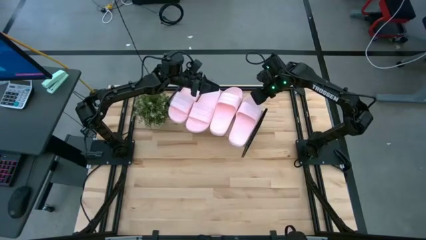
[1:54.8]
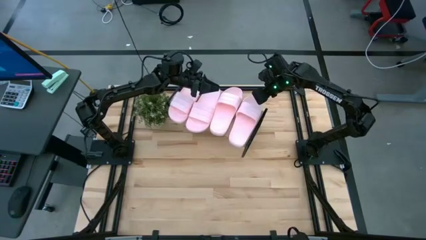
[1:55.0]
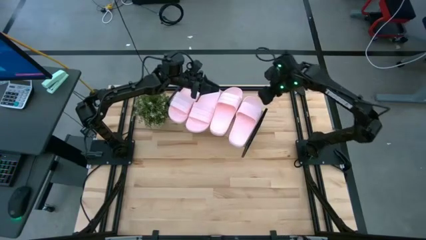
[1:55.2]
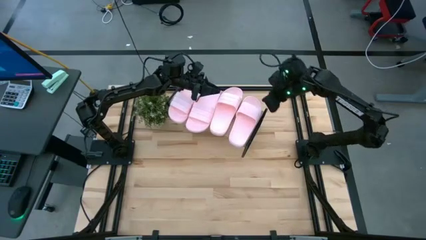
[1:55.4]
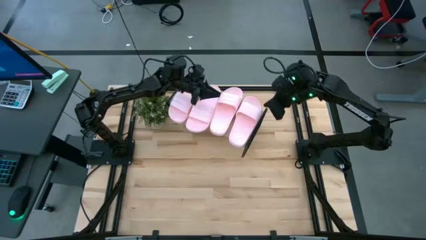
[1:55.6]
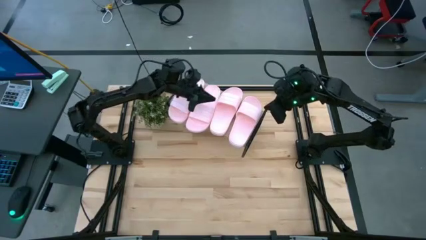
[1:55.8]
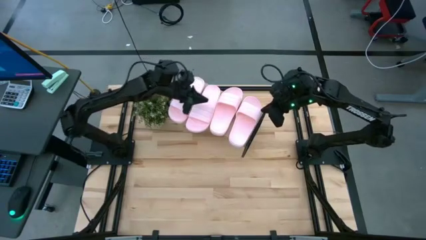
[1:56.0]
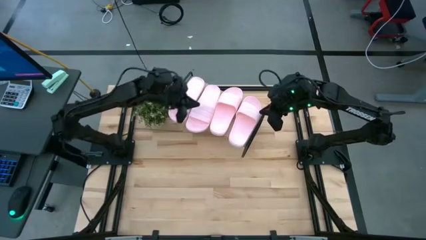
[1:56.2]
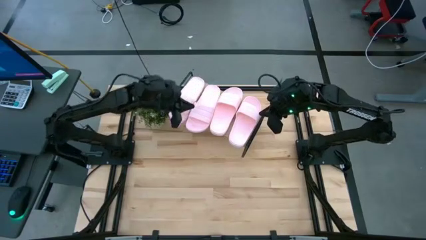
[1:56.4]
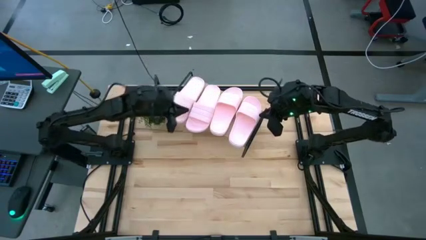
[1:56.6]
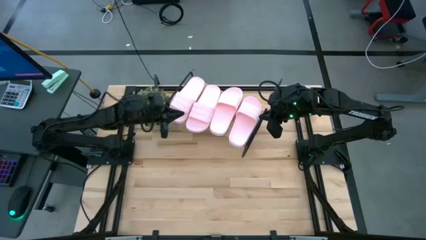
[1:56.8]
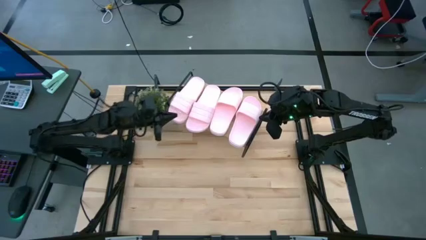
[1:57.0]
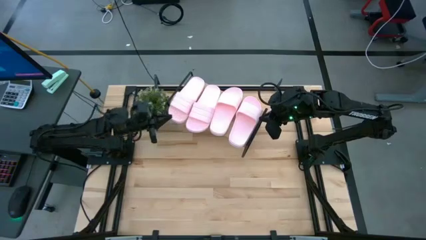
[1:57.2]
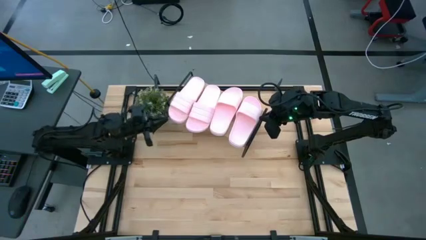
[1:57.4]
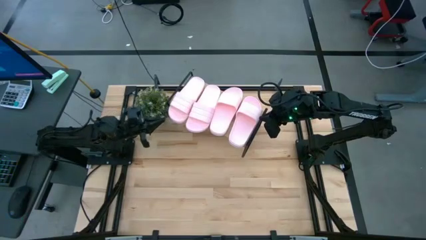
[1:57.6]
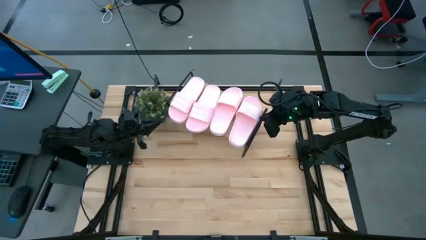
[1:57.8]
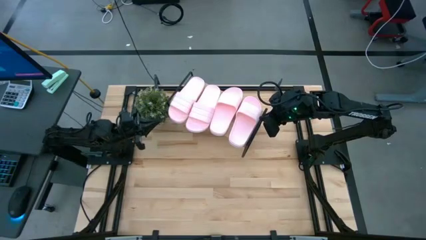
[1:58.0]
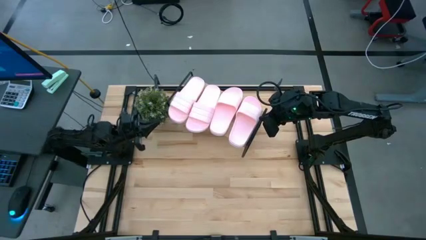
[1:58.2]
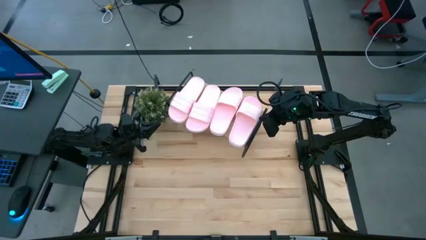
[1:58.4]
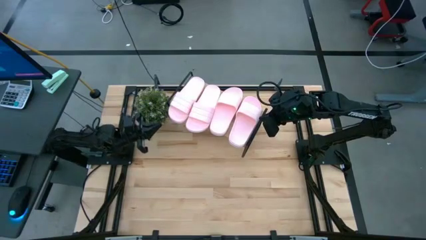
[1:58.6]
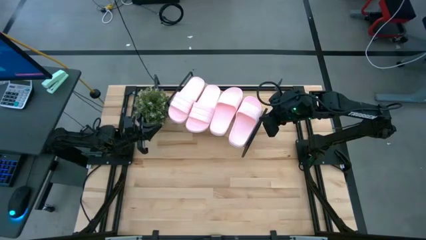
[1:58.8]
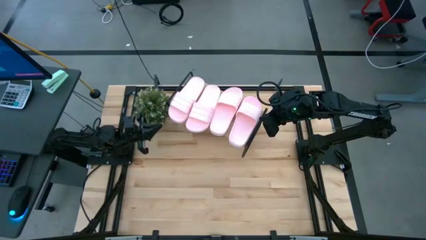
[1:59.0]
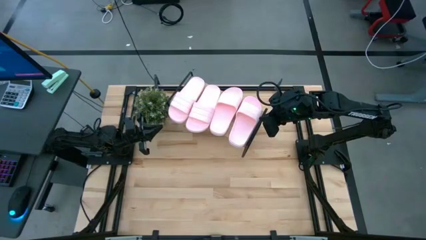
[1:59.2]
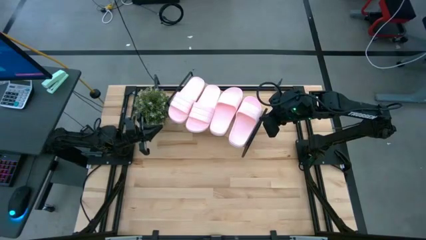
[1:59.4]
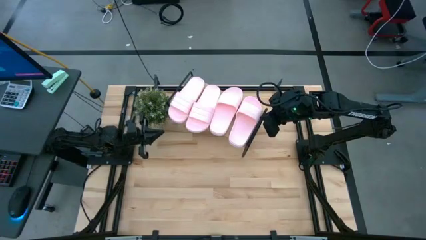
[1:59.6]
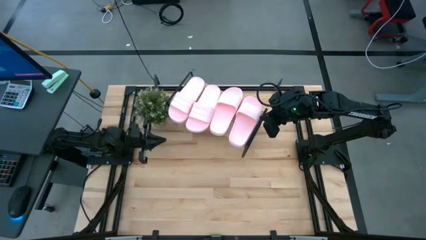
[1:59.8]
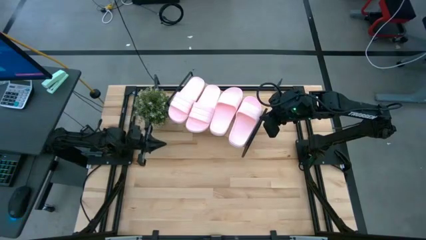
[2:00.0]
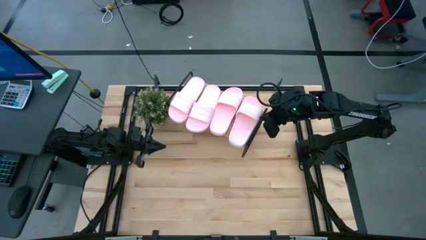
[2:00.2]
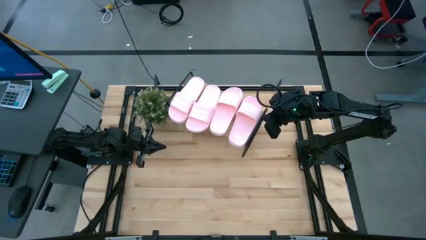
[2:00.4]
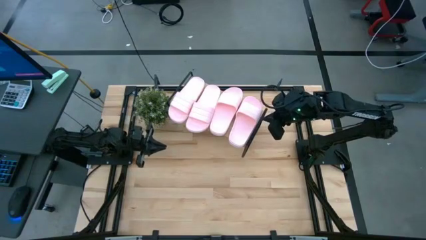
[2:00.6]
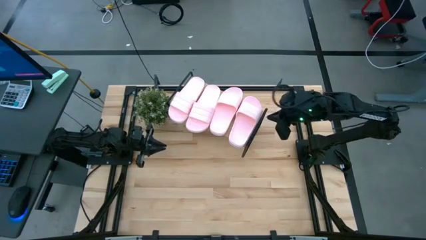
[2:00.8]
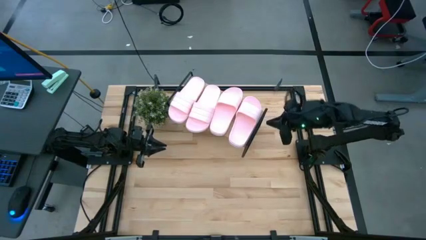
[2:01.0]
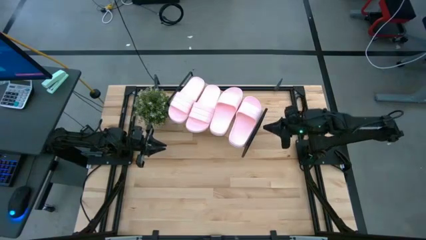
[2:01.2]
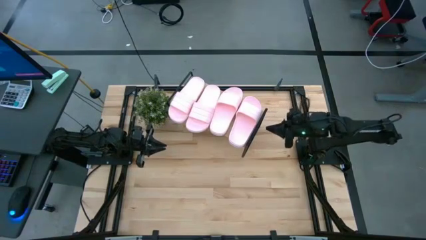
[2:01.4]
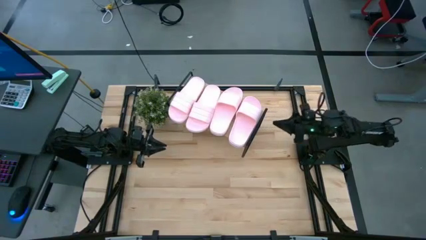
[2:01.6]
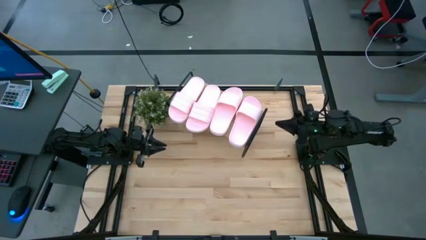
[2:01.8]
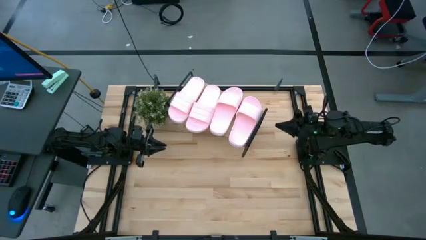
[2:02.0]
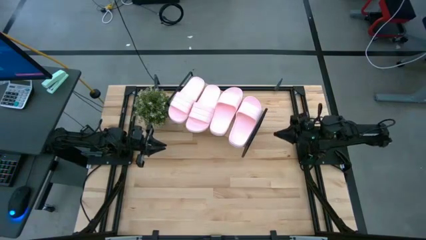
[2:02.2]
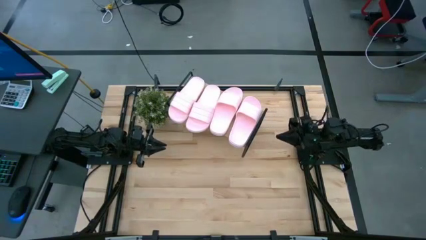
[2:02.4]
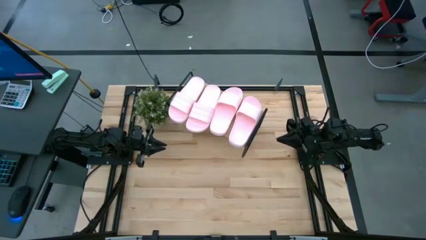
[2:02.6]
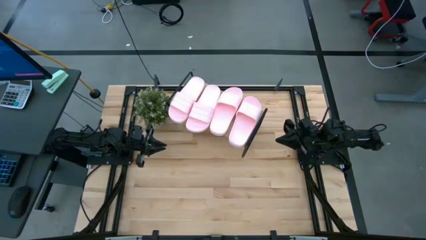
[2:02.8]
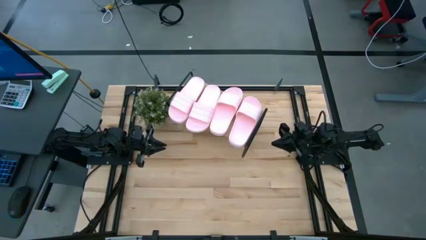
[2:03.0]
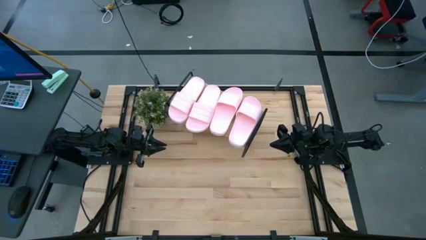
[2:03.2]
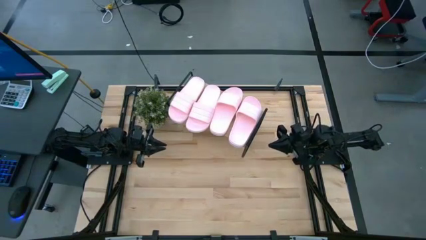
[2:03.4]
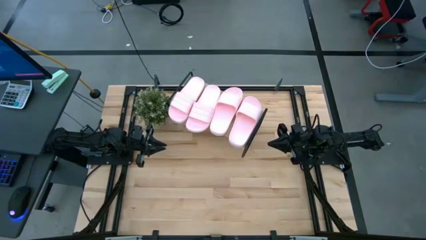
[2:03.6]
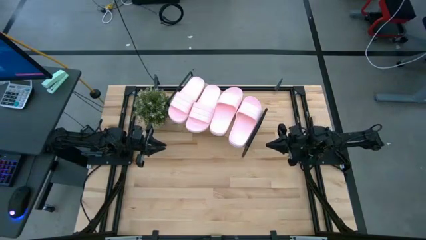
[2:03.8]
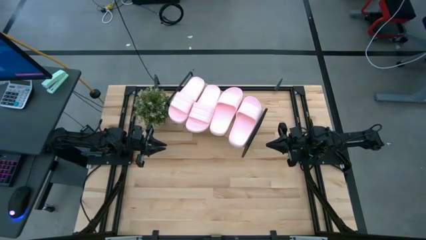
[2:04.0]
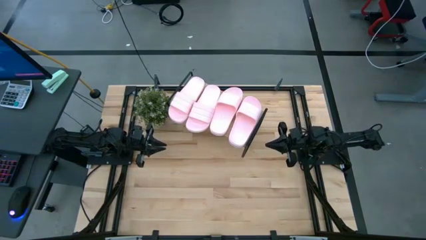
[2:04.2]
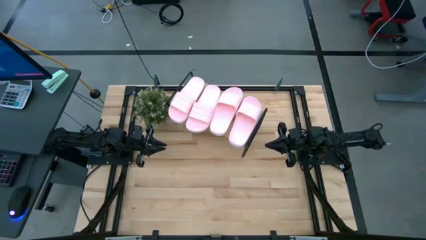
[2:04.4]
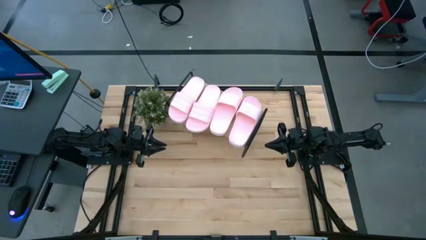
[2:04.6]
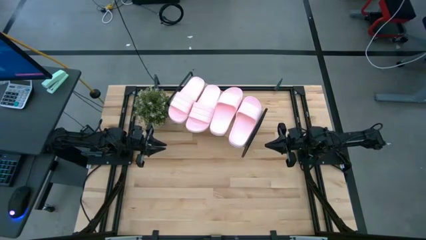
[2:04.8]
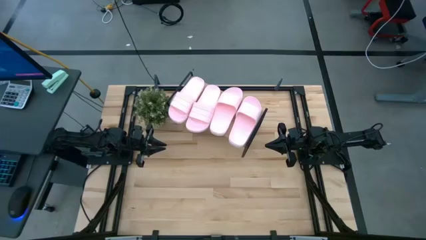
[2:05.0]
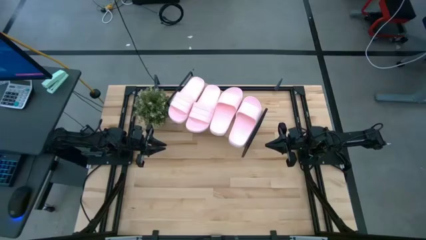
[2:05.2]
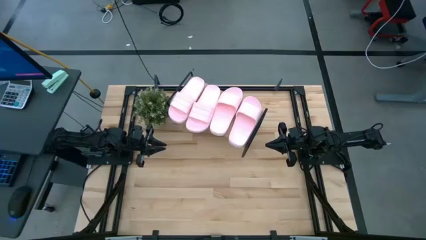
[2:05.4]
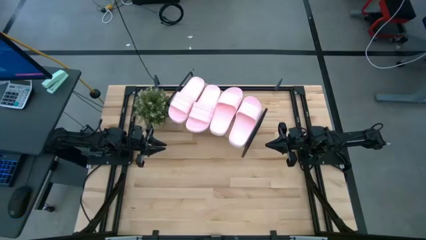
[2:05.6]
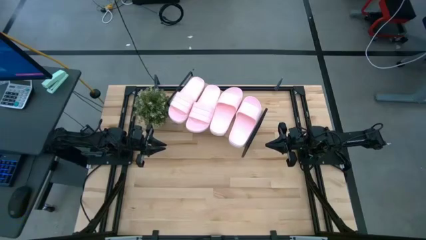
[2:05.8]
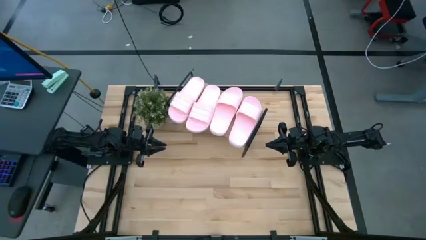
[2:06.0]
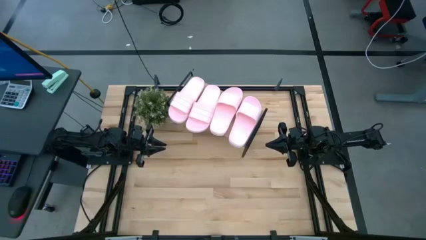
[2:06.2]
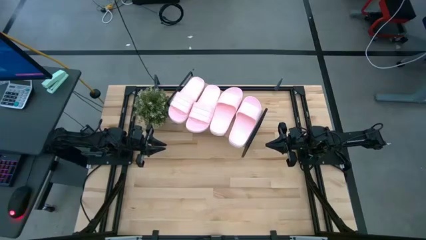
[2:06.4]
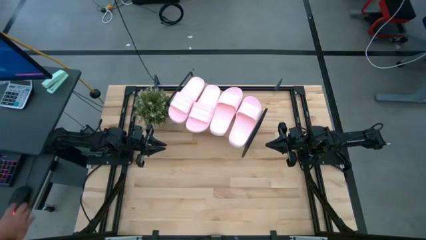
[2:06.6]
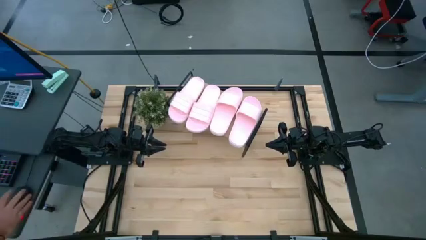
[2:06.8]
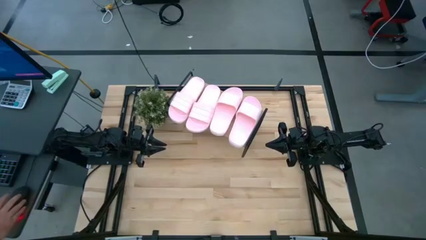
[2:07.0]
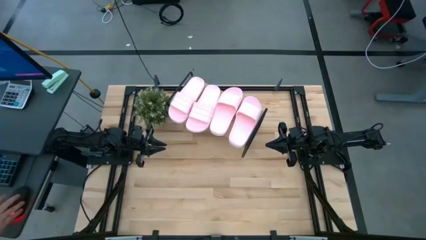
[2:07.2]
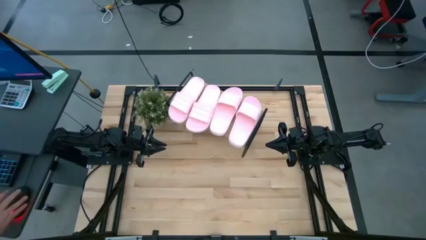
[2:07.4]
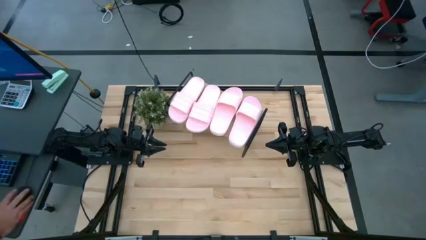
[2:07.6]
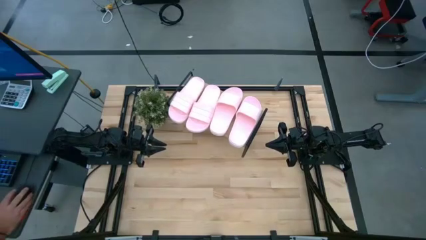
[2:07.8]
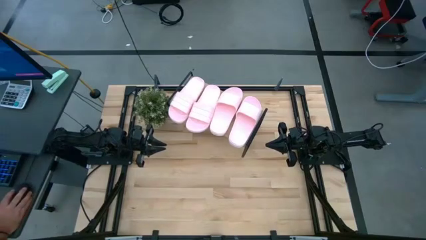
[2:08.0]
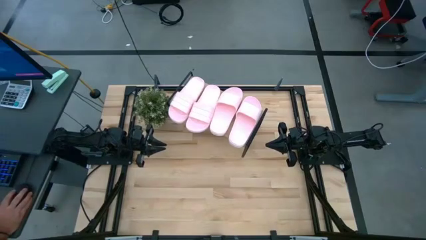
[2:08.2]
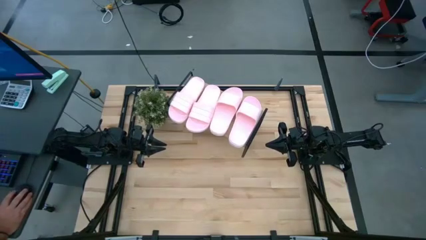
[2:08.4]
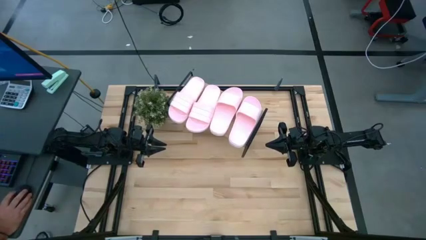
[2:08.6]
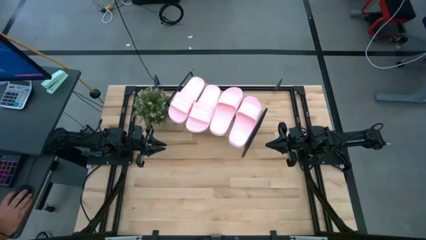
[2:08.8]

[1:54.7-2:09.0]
Task: Pick and place slides into the shelf
Return to Home Position
